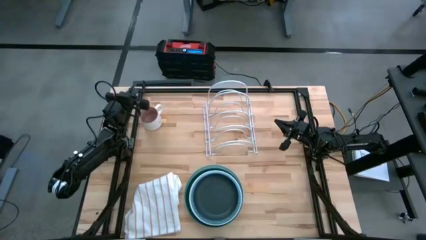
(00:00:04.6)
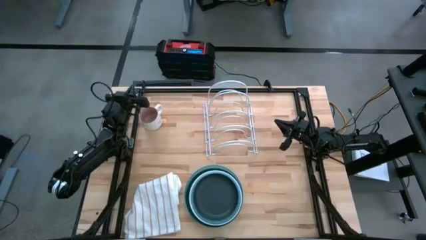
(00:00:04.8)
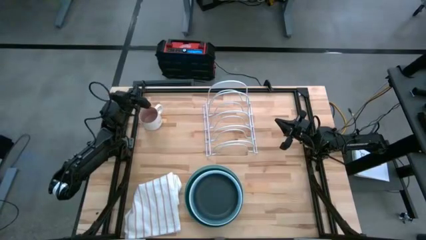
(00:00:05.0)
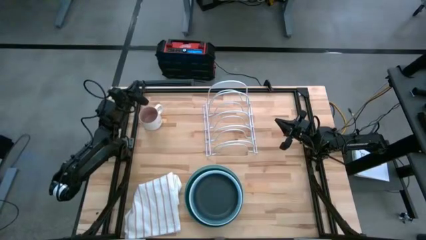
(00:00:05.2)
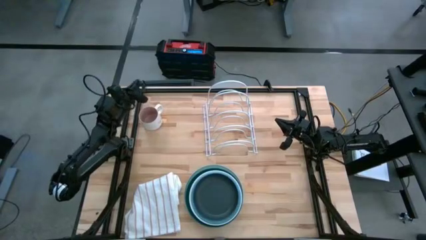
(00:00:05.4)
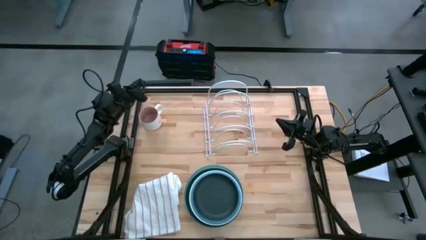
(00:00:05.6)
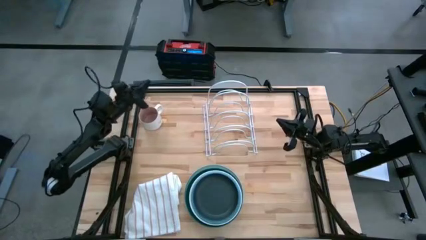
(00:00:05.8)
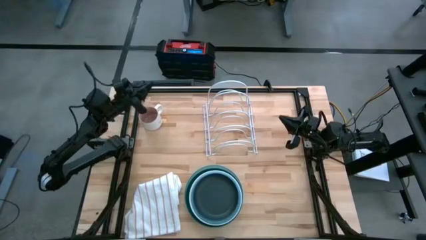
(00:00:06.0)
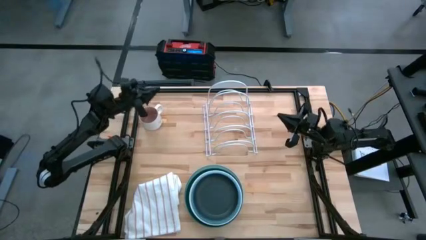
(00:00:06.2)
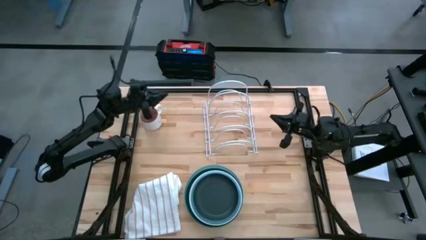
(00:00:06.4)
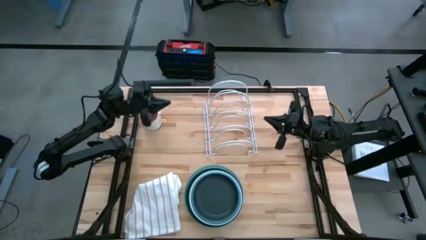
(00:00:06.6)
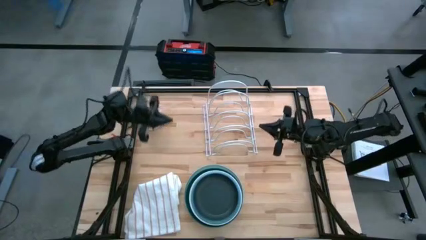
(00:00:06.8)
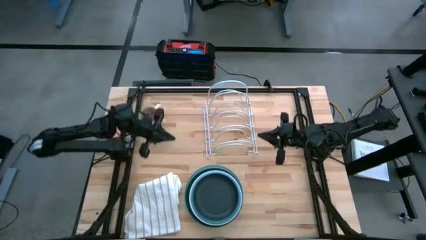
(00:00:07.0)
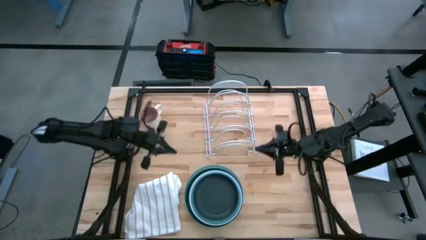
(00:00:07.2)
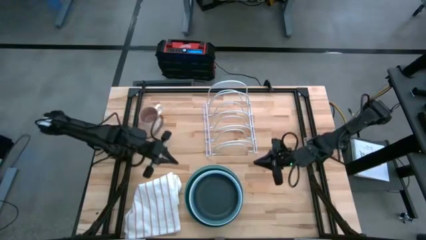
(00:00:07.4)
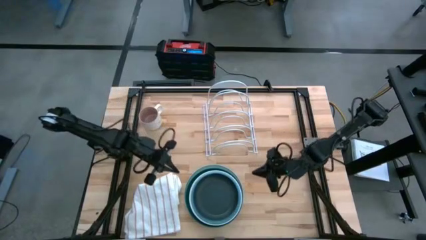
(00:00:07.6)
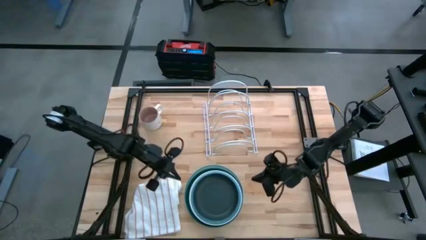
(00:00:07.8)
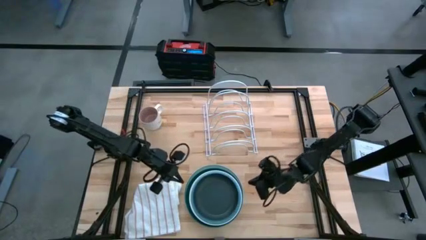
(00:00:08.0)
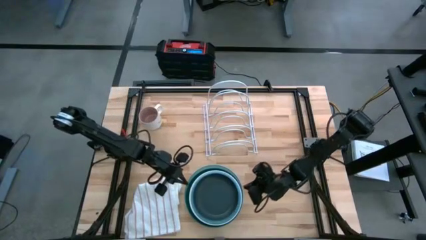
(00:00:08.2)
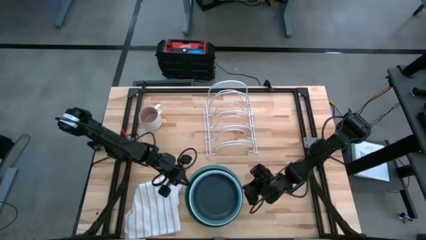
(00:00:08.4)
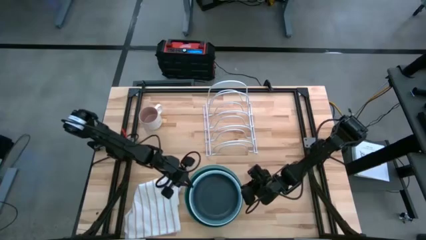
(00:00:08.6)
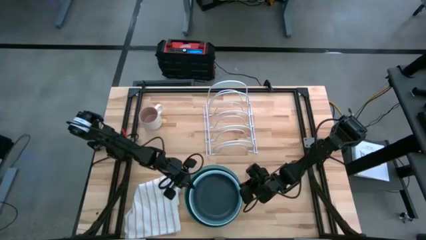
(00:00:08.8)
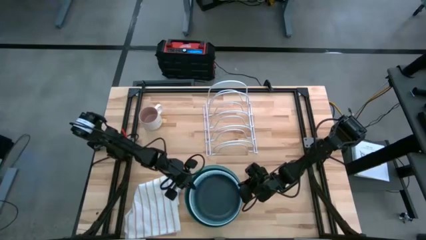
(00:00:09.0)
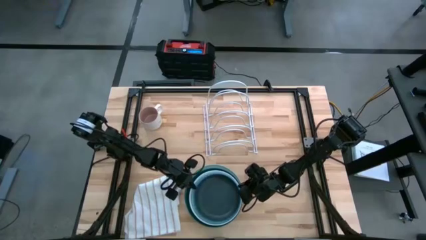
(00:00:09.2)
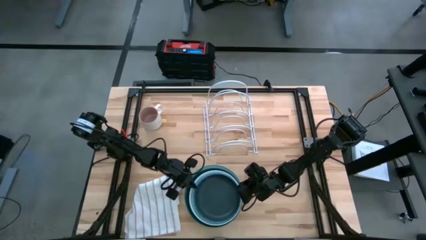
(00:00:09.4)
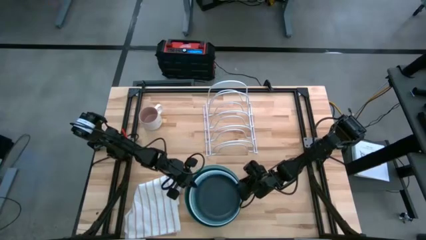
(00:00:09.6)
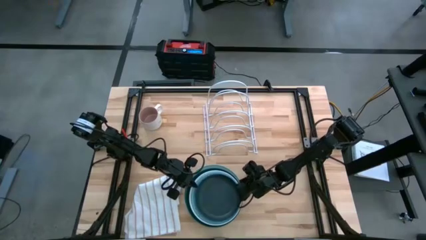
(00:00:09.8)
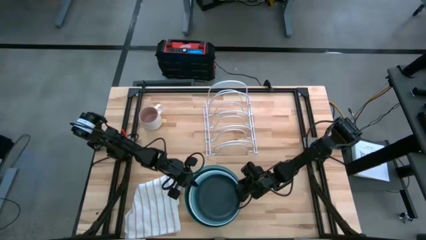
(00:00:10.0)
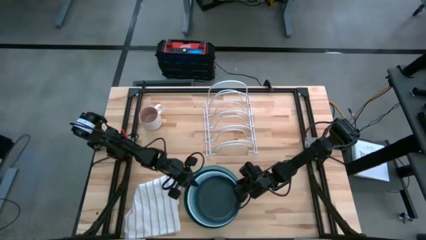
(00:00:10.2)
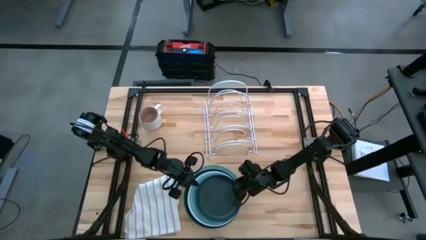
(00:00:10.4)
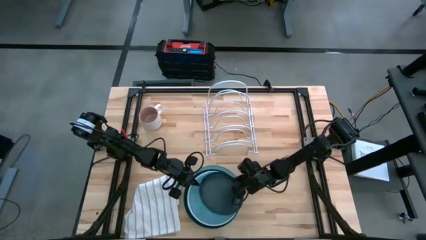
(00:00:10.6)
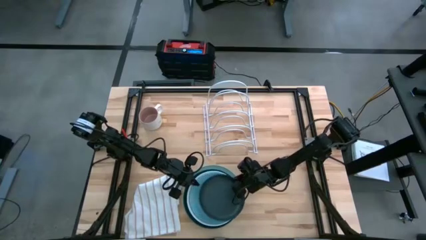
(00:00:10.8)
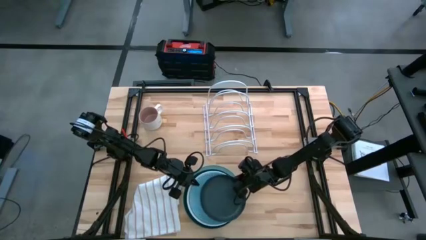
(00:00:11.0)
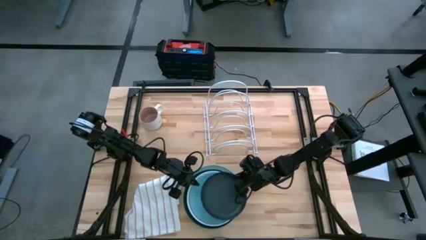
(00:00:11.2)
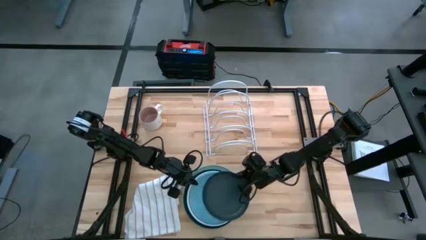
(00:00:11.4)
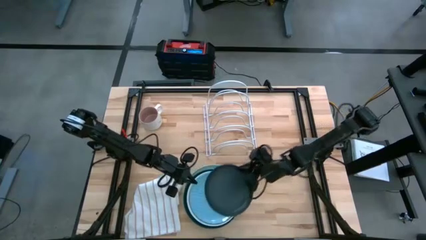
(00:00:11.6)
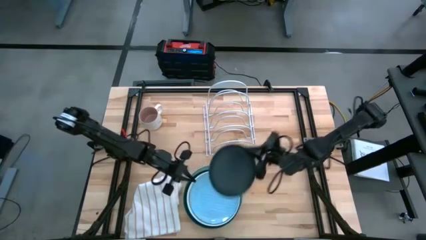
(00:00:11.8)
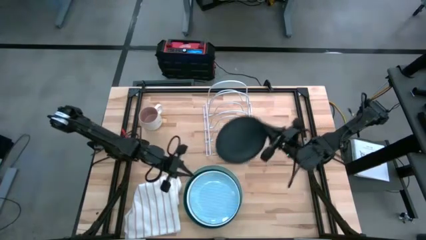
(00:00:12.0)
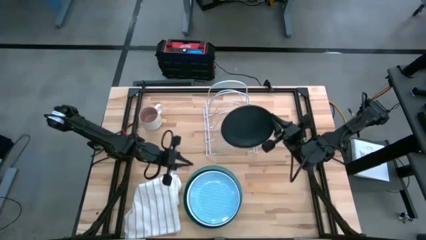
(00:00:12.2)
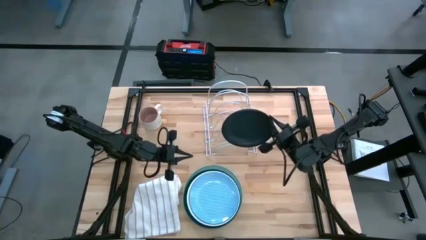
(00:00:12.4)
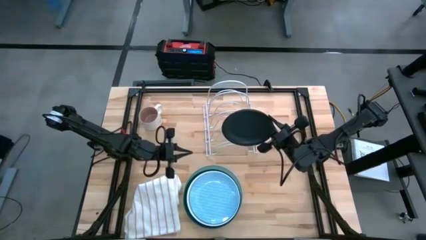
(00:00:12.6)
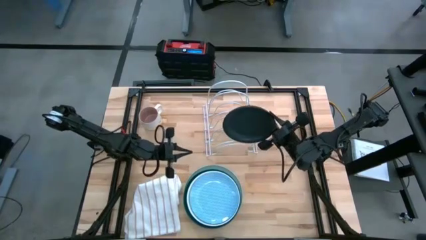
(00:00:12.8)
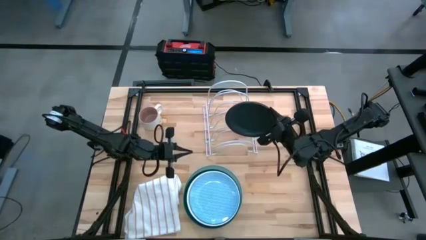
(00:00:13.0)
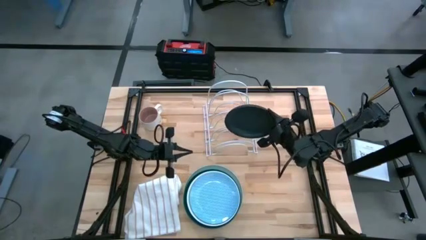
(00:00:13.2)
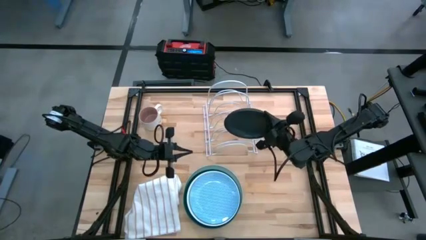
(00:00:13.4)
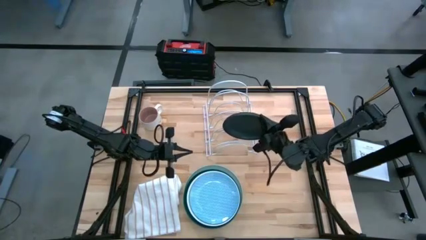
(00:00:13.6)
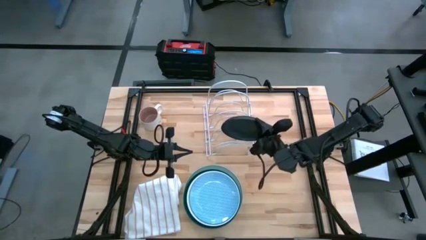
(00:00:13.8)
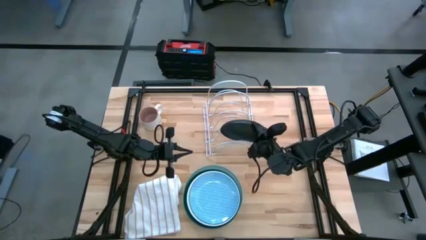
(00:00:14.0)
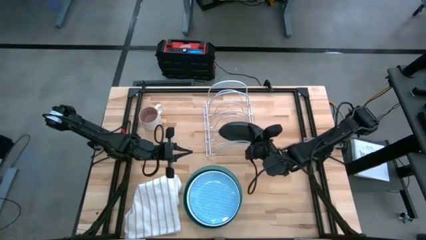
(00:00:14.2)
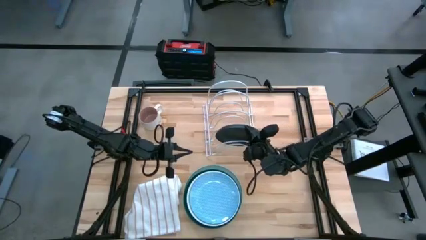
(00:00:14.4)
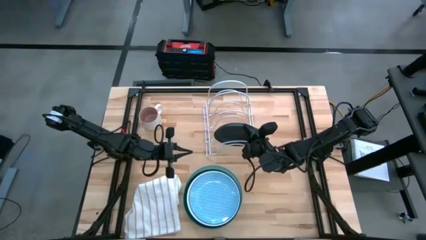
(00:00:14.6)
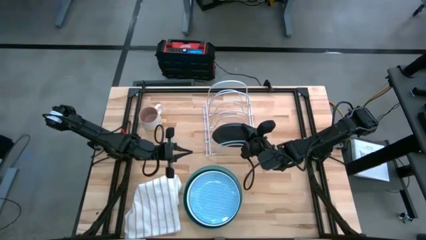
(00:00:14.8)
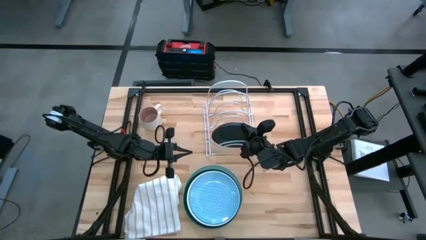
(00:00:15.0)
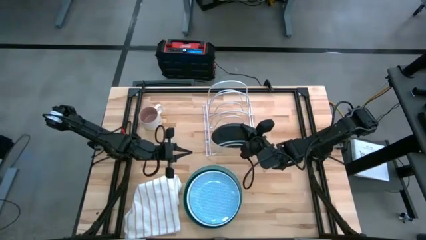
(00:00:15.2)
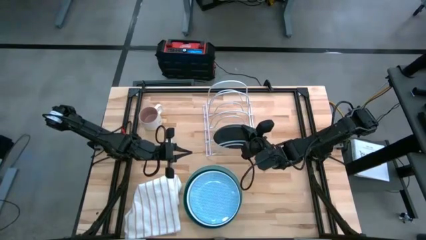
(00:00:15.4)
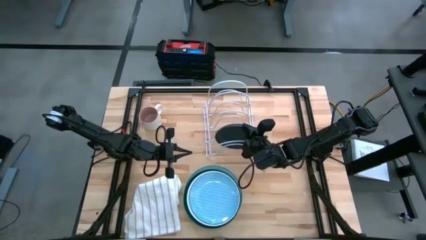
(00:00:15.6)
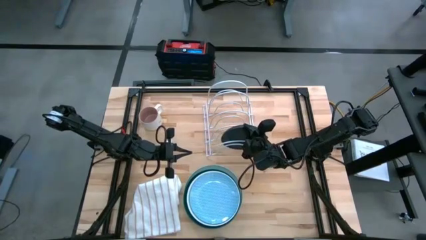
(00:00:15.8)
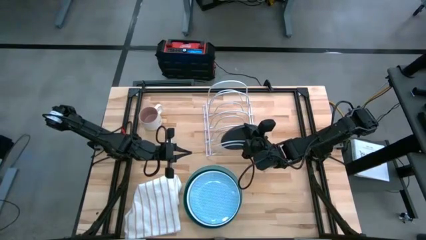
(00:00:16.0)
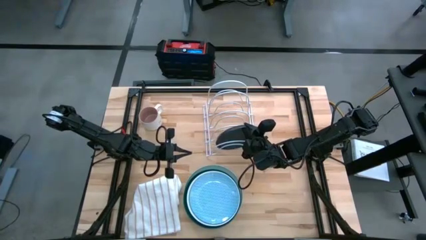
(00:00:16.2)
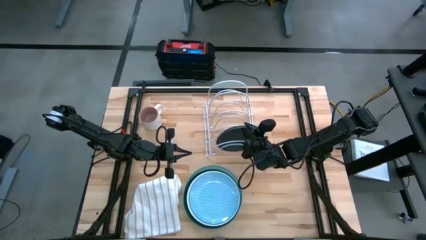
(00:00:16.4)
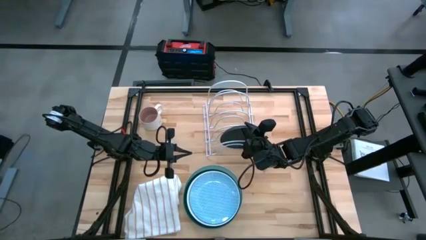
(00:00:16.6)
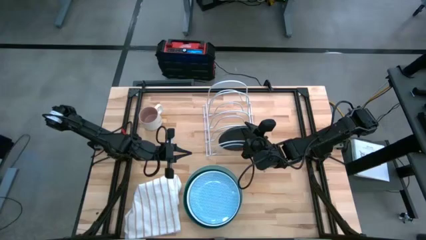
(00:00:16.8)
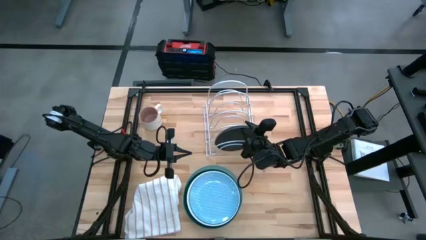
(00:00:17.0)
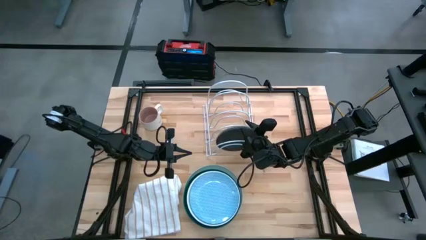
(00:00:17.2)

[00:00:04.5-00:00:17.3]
Task: Sort dishes
Put the black plate into the dish rack

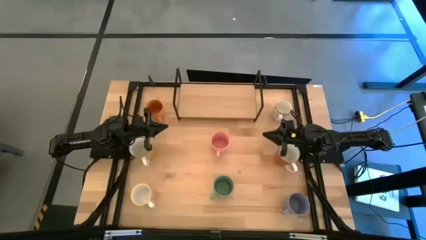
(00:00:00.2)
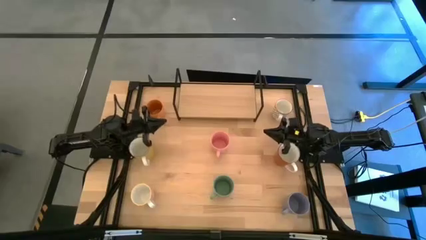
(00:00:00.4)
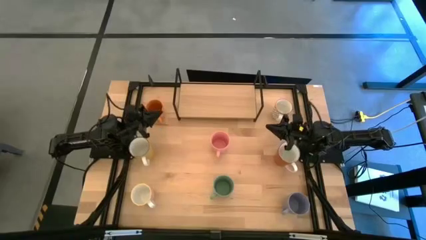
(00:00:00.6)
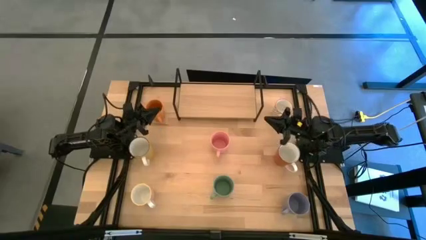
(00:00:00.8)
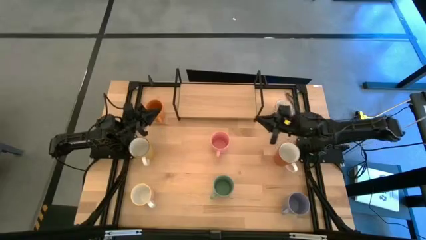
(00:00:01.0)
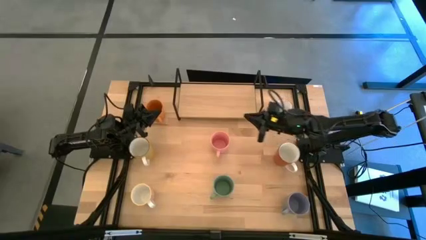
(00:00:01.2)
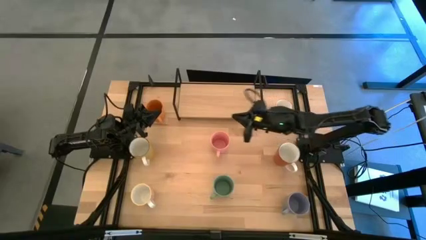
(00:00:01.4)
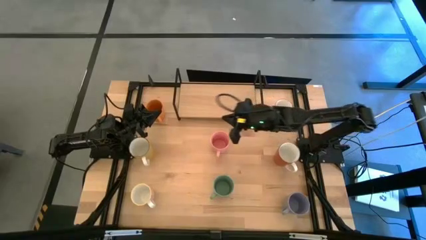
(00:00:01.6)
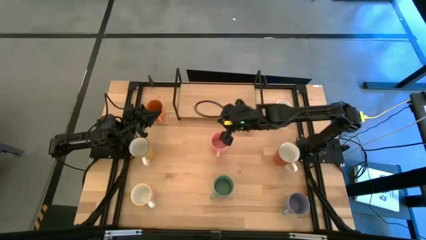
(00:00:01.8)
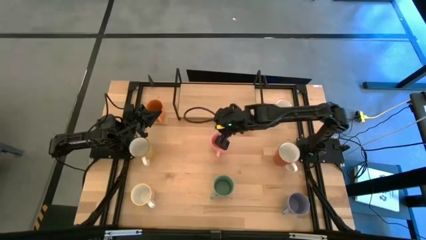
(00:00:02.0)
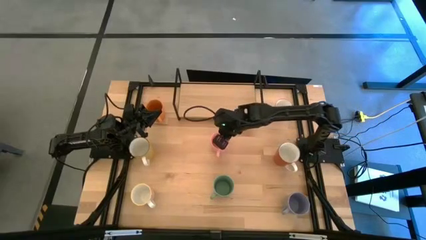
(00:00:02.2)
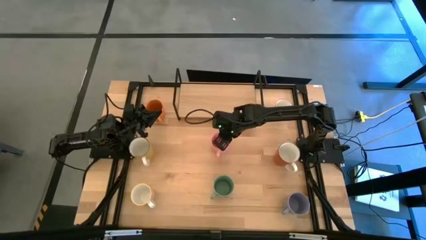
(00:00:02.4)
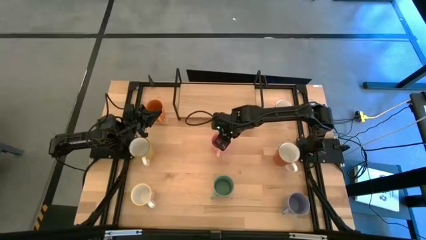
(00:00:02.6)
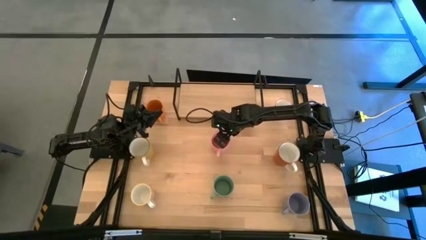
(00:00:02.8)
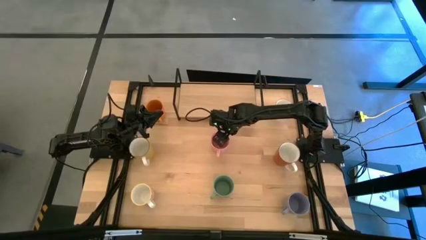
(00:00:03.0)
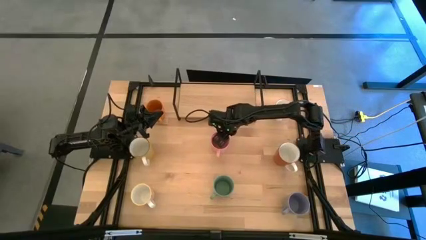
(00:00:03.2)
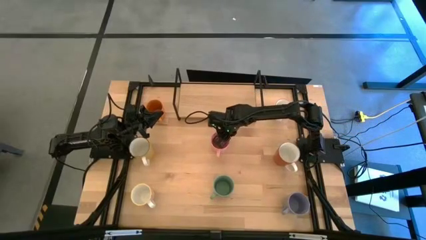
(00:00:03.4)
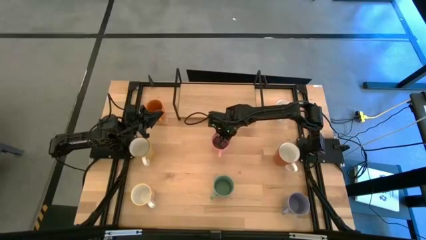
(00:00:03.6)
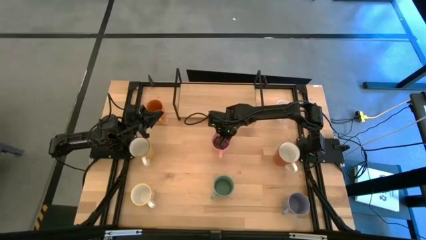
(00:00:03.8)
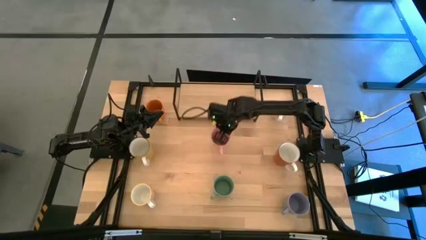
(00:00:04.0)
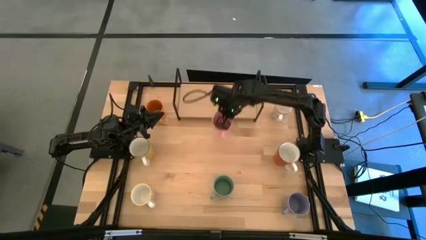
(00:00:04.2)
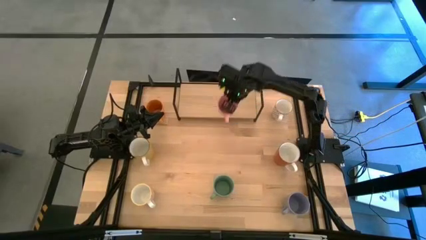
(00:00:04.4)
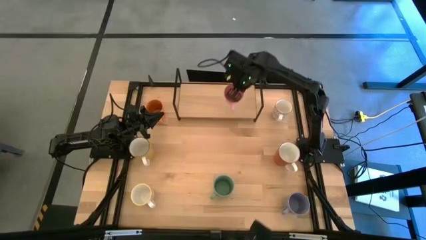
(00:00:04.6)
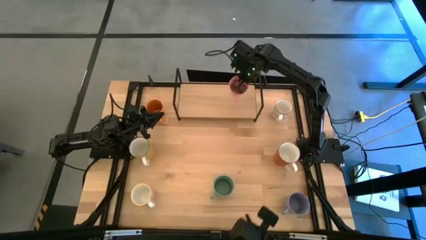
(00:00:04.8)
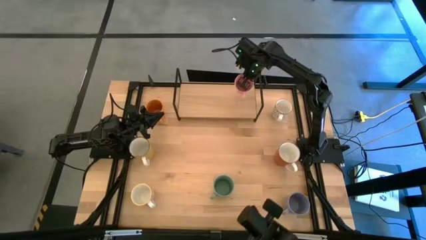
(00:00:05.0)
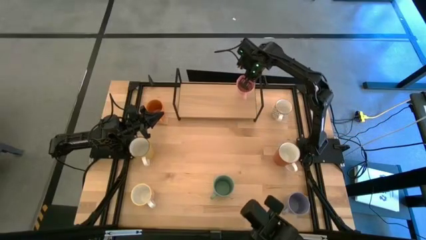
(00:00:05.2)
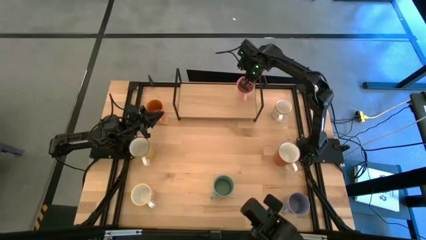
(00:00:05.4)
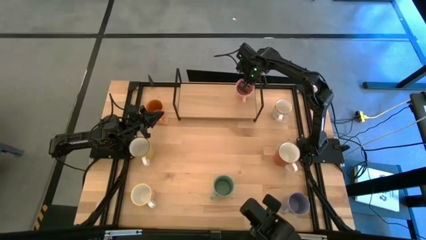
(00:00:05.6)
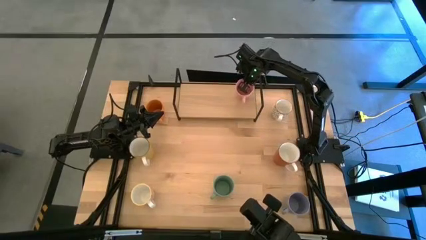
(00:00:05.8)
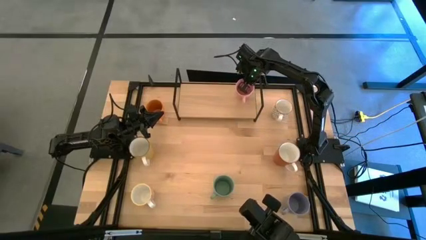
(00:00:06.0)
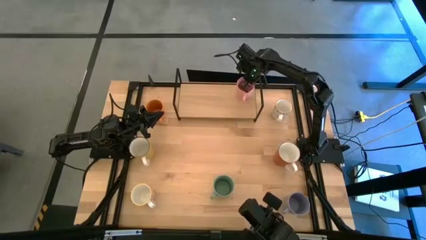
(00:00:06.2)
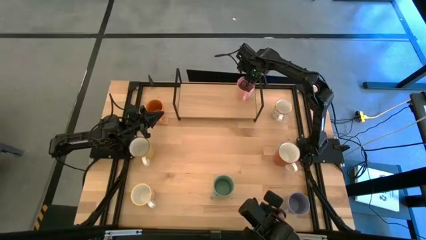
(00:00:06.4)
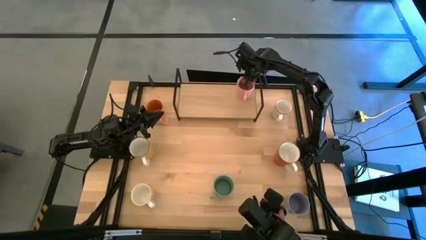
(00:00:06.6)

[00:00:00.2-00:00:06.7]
Task: Place coffee mugs
Put the pink mug on the shelf
